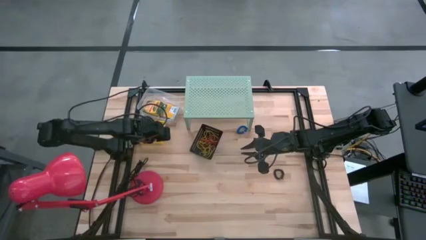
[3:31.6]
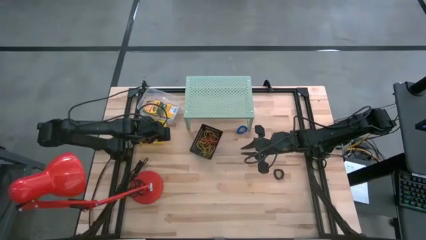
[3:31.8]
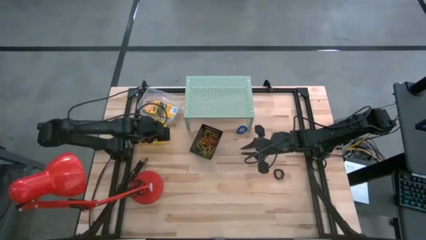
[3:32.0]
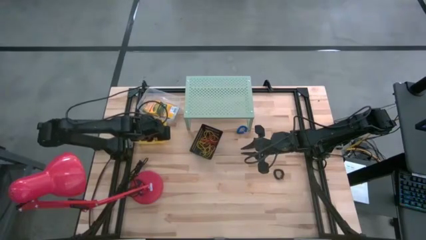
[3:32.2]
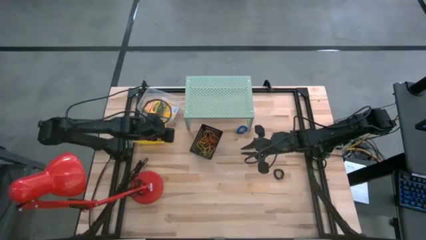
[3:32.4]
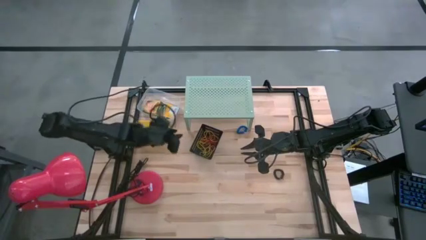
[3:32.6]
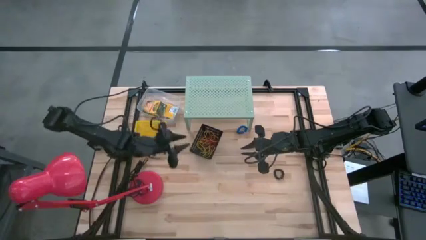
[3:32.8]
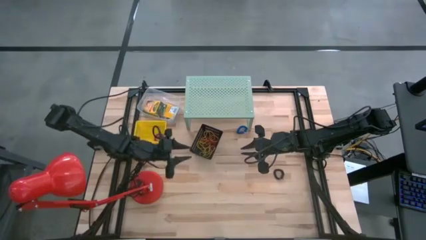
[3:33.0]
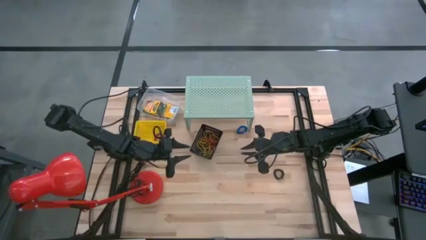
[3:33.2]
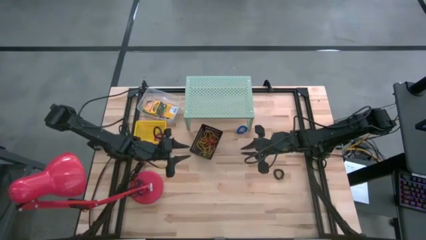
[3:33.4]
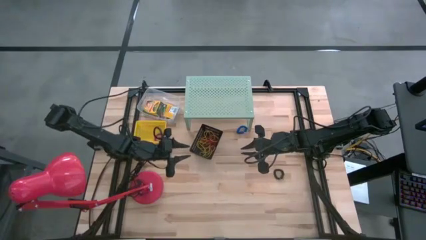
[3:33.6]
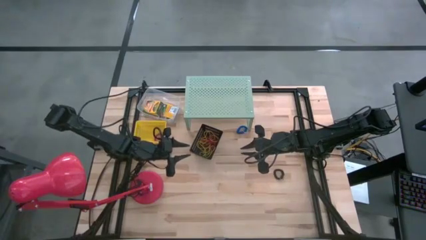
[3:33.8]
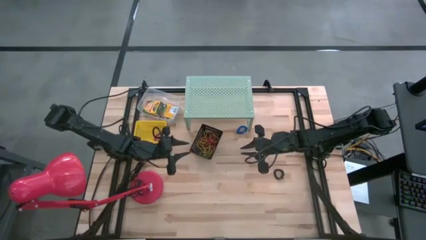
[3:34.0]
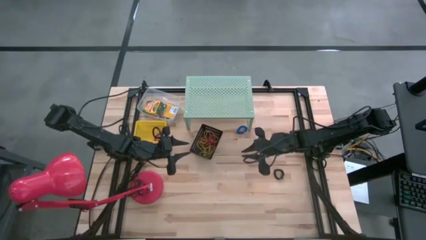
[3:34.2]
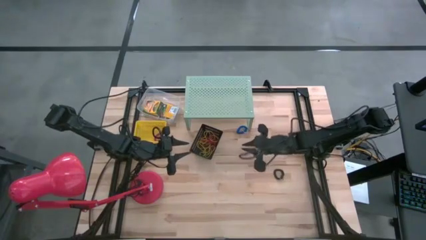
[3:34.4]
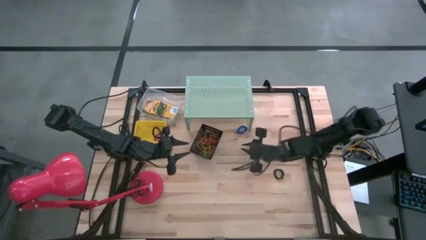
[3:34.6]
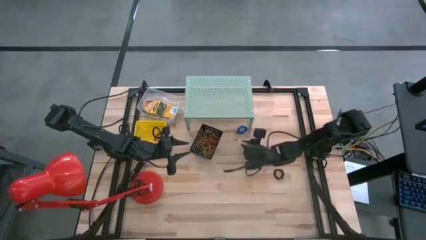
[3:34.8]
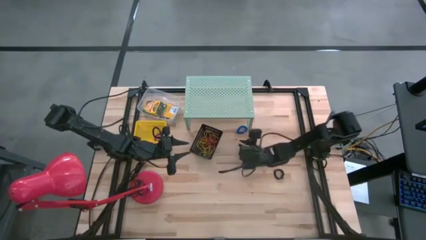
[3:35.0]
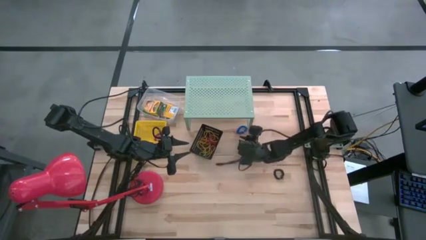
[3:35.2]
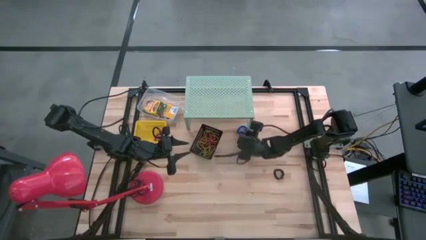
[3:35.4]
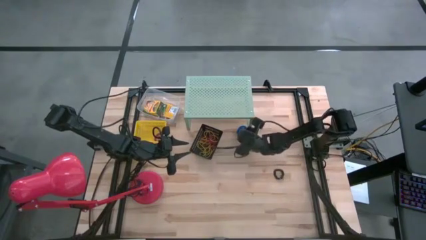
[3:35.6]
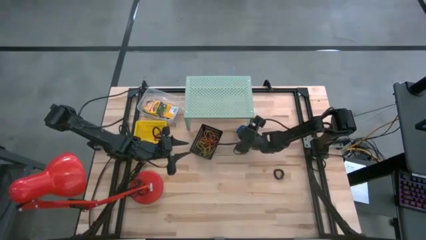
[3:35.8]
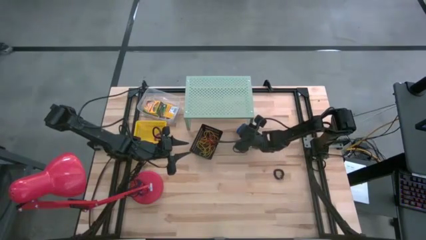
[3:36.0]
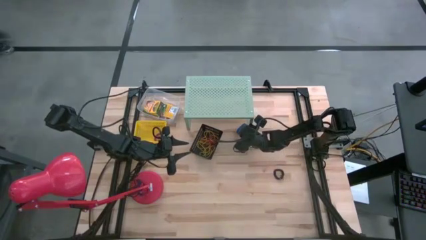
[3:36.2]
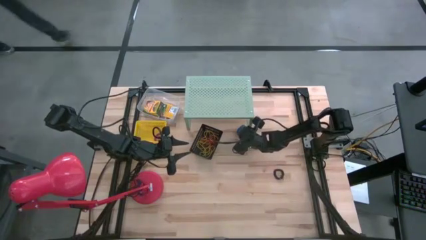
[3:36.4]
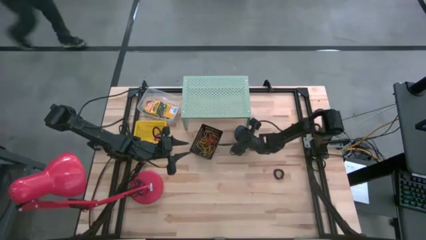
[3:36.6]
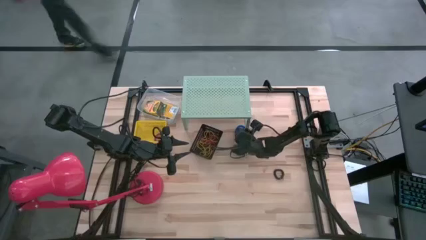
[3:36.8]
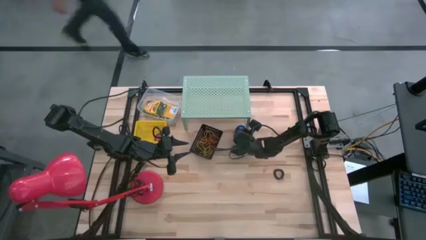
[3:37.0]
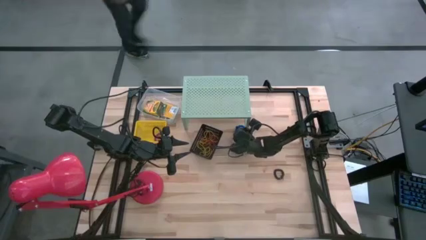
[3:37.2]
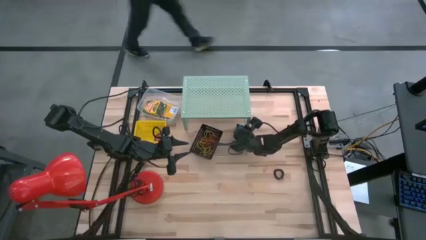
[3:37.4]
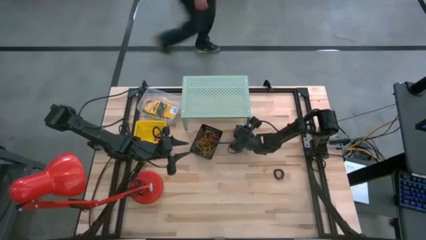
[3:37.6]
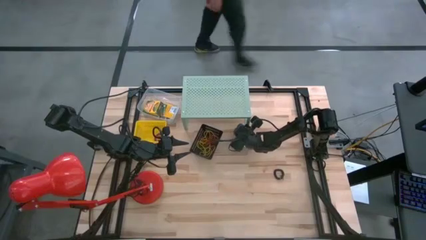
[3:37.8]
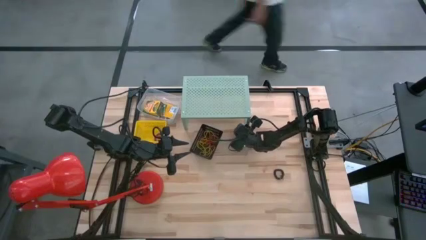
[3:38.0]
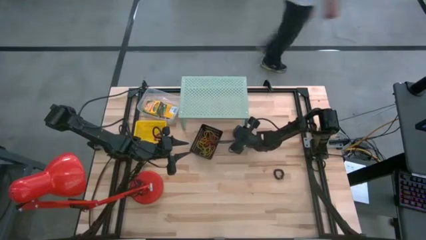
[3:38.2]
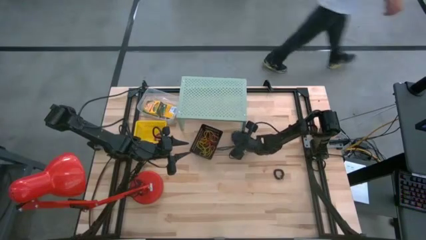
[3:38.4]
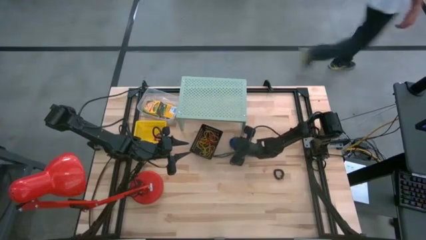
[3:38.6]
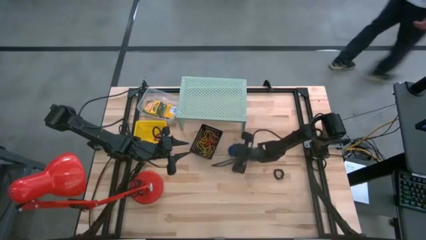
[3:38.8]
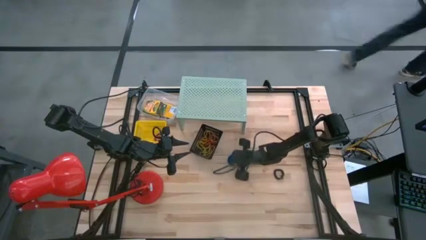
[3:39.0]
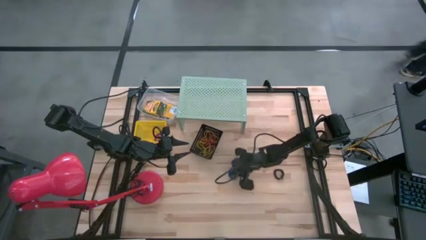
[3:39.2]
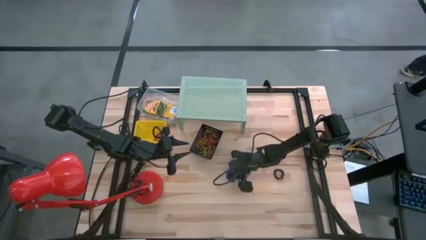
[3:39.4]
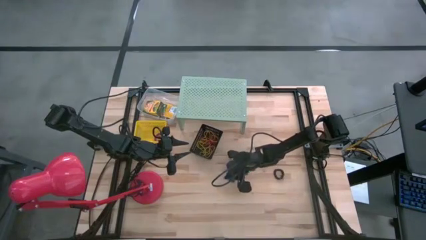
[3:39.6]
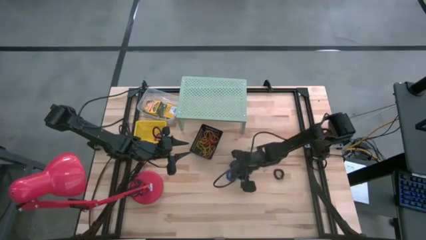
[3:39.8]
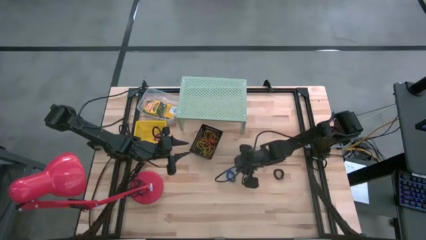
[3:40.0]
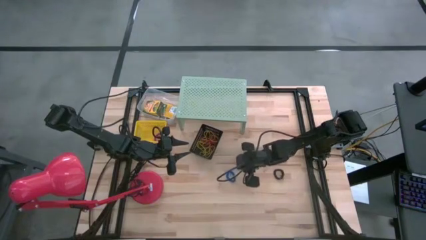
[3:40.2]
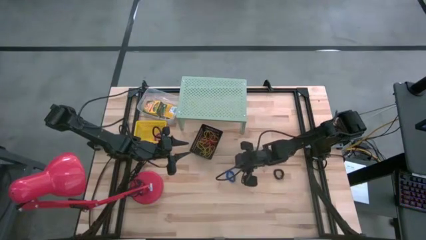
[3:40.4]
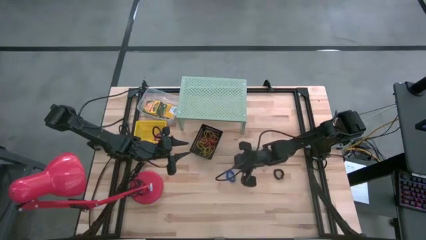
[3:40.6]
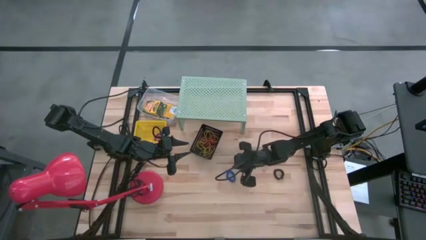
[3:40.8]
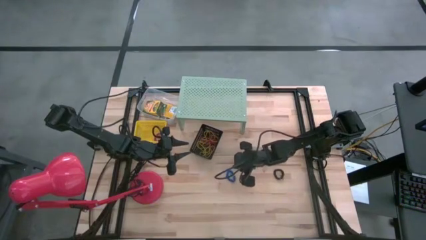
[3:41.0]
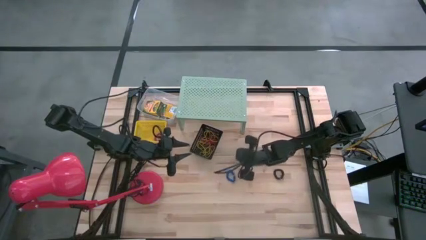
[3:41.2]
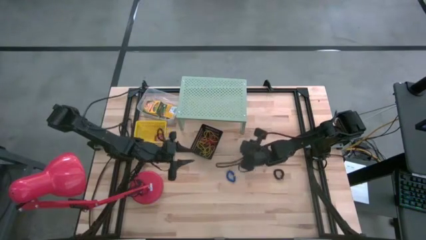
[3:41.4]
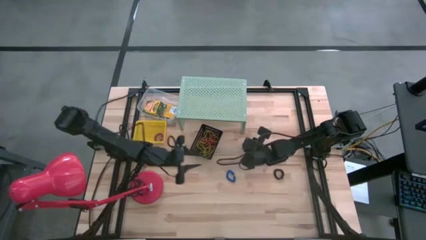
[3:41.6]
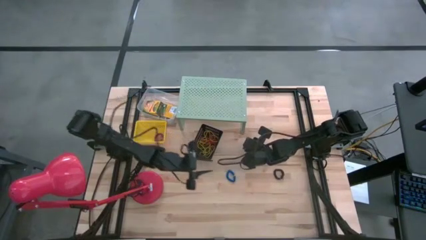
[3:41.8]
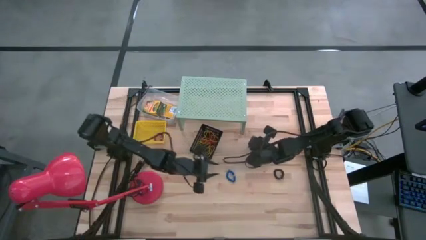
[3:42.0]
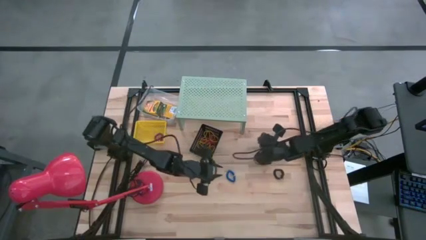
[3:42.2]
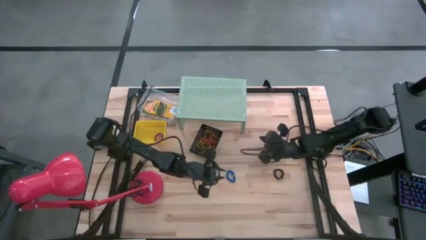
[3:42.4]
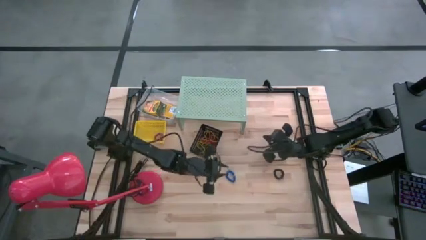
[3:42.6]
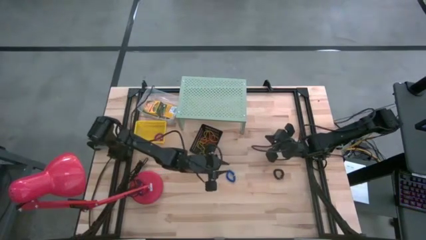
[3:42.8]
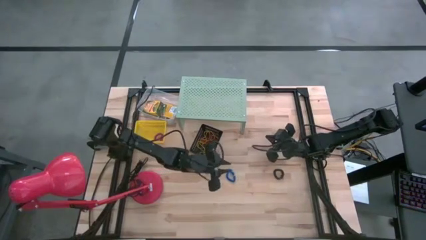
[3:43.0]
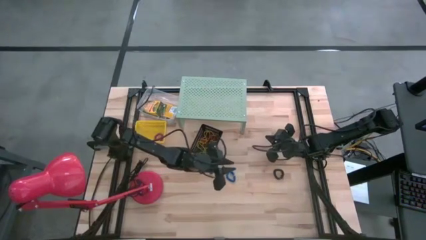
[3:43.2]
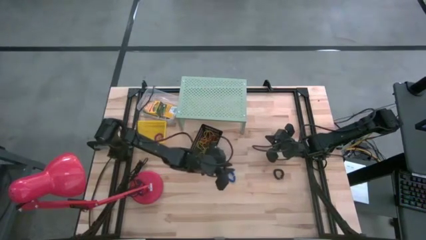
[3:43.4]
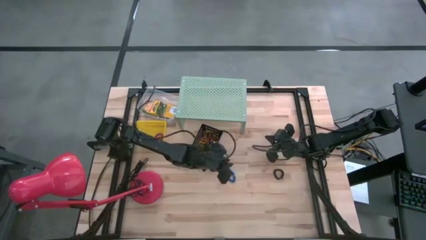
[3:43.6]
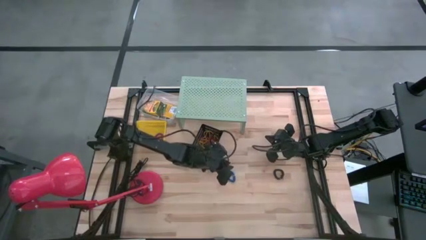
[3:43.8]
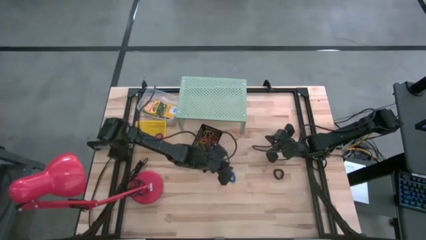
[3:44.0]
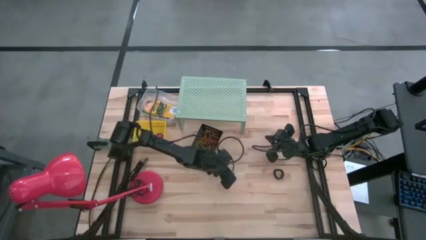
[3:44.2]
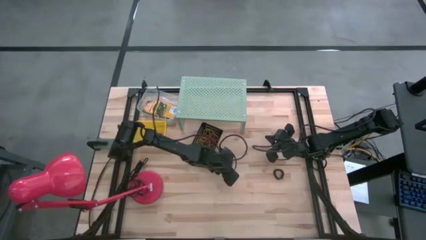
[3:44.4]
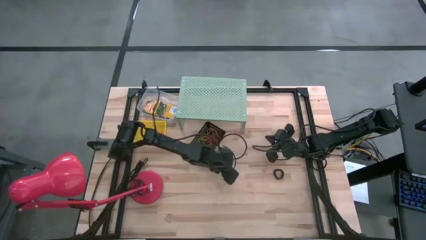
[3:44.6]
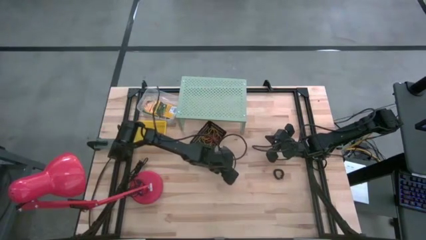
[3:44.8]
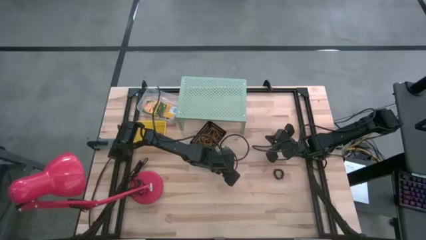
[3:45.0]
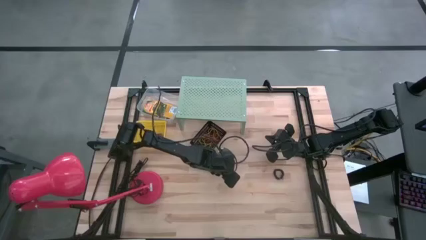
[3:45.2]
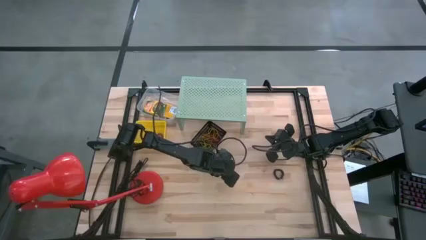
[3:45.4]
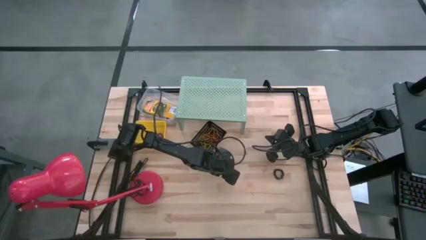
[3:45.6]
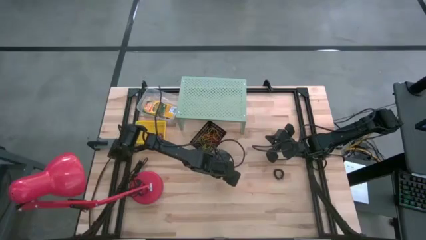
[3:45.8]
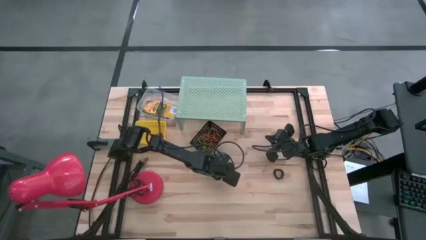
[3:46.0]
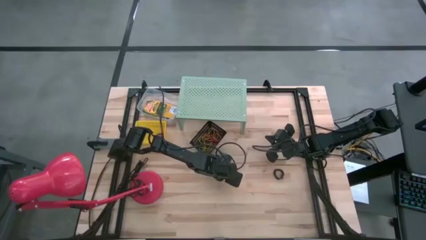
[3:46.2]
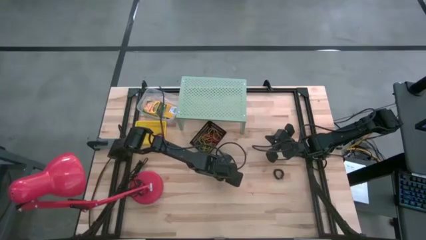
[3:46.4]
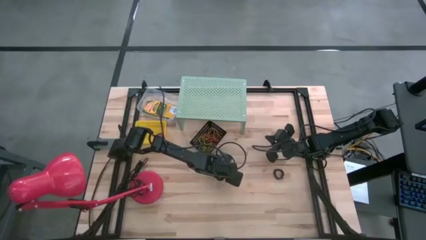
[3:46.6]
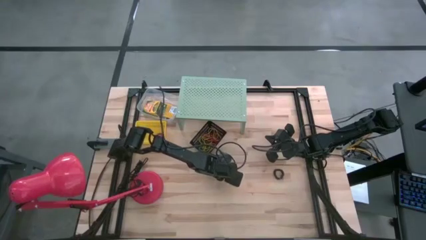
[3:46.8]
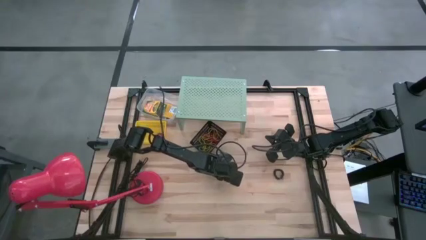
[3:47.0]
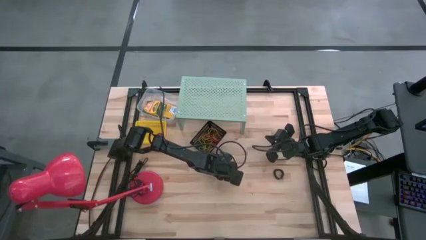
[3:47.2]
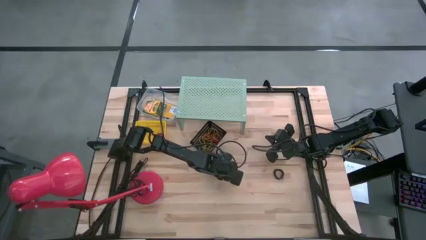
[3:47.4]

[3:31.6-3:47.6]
Task: Pick & Place Office Desk Supplies
Put the blue spring rubber band into the yellow bin
